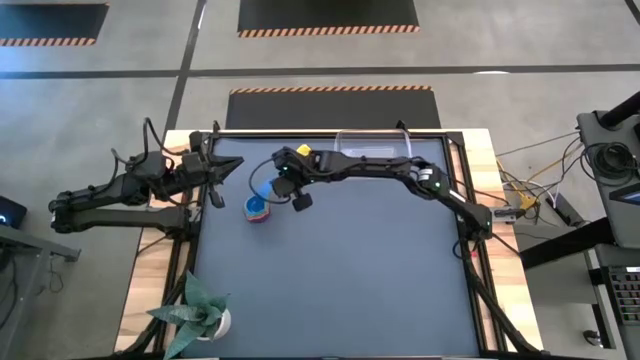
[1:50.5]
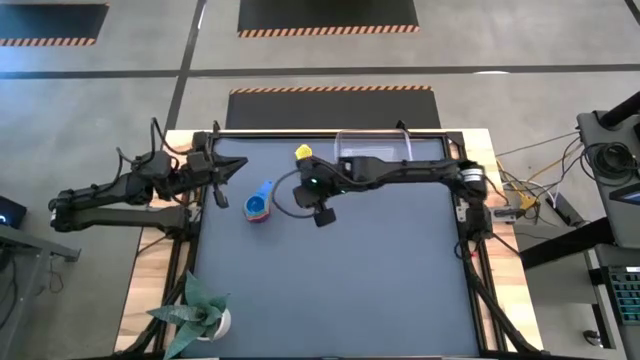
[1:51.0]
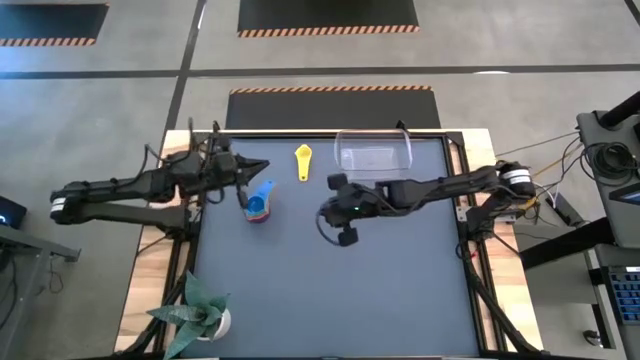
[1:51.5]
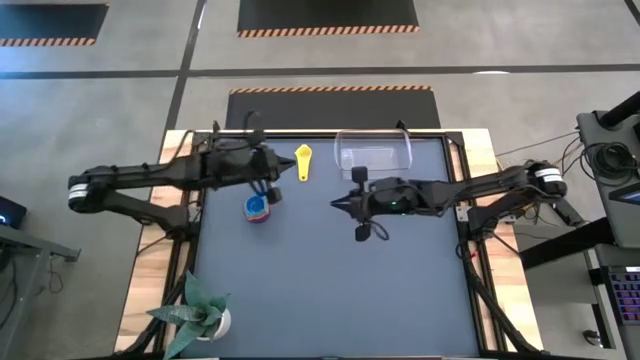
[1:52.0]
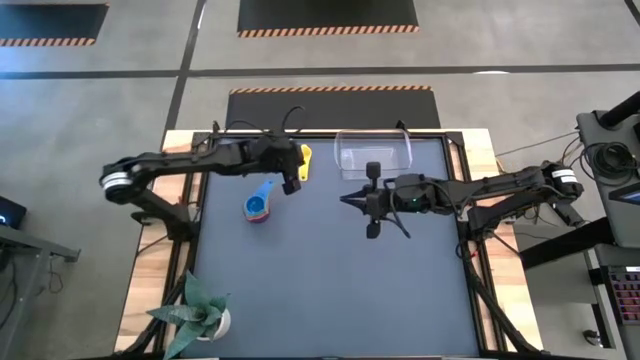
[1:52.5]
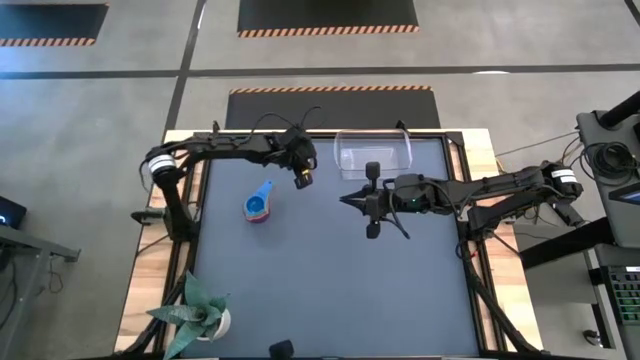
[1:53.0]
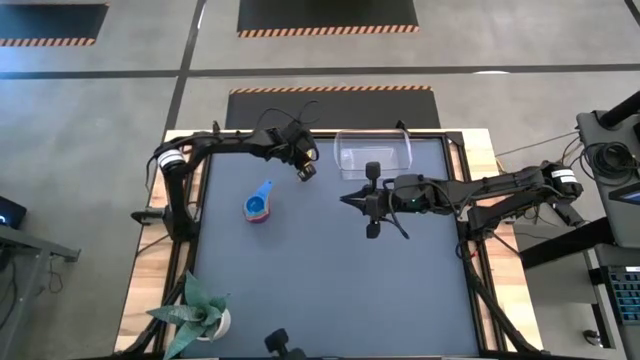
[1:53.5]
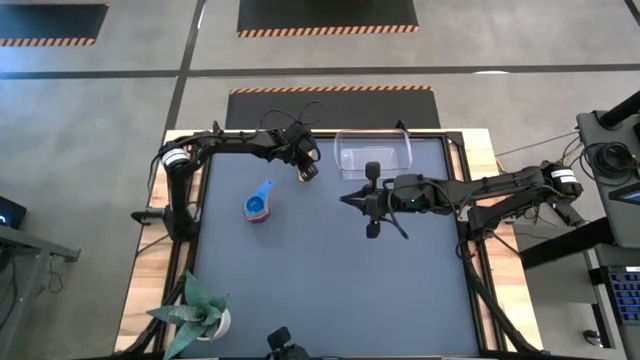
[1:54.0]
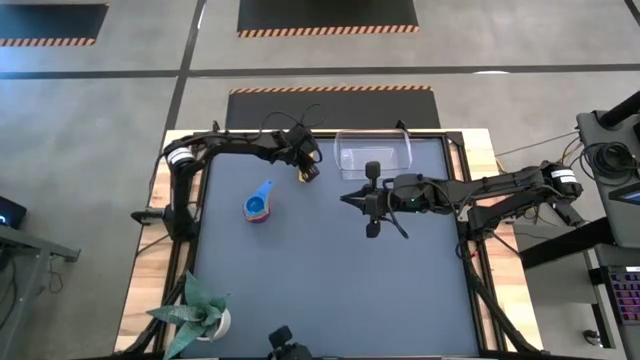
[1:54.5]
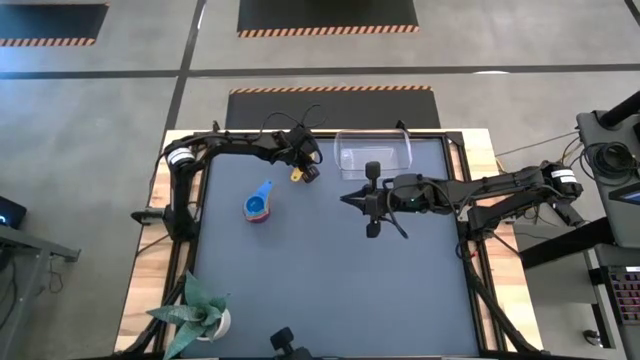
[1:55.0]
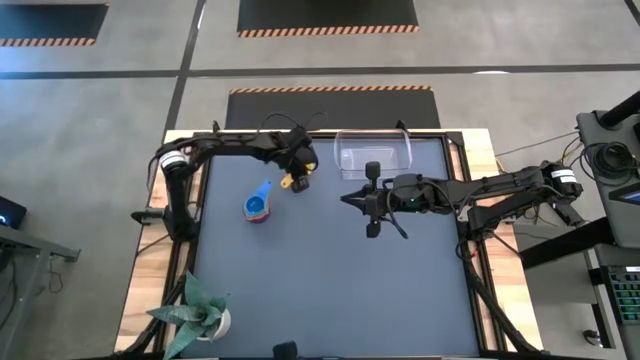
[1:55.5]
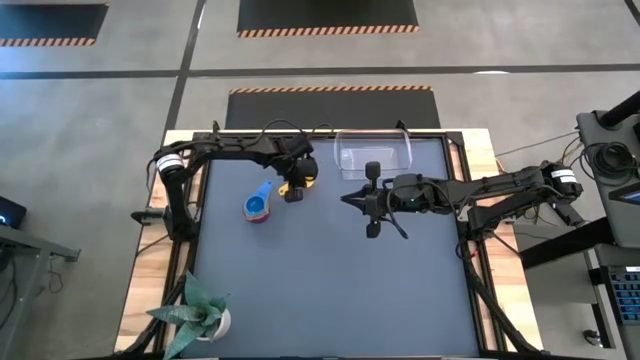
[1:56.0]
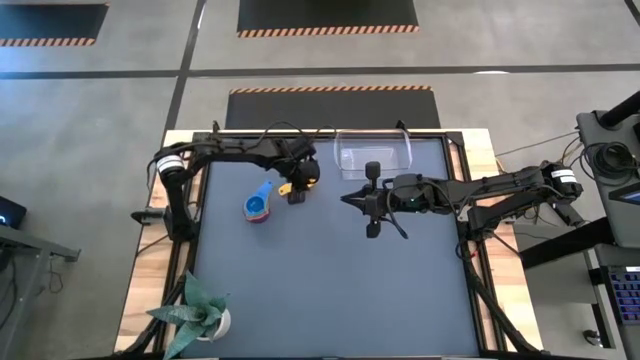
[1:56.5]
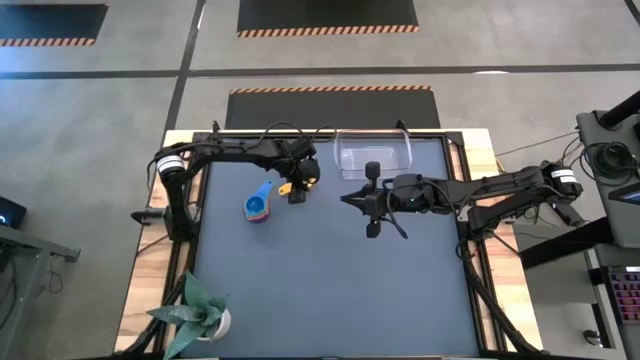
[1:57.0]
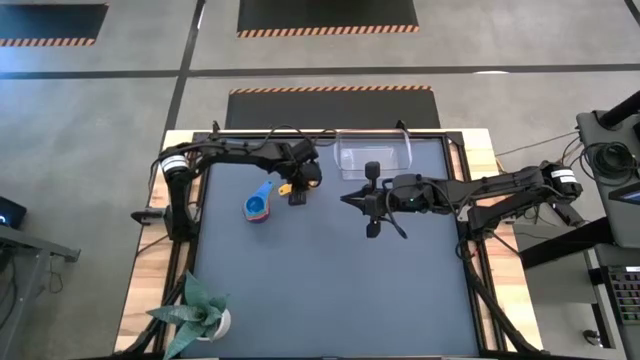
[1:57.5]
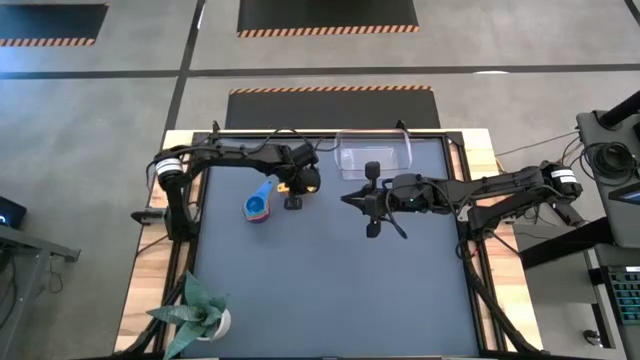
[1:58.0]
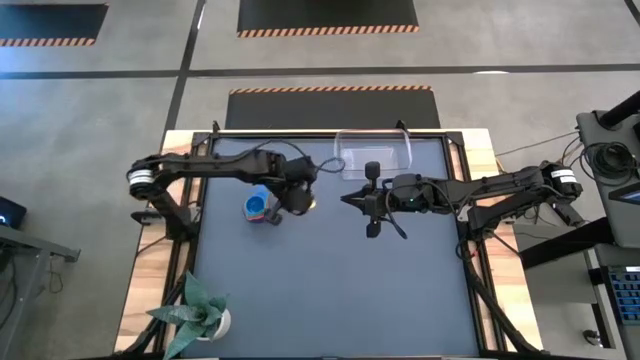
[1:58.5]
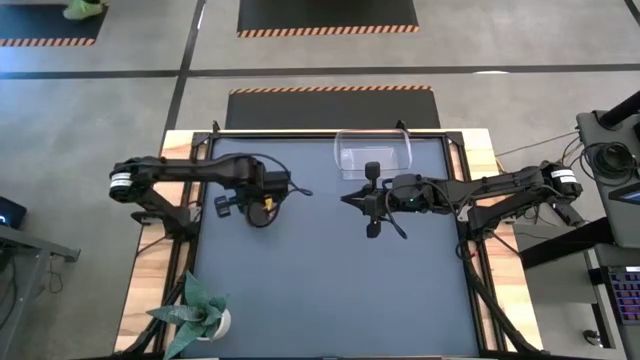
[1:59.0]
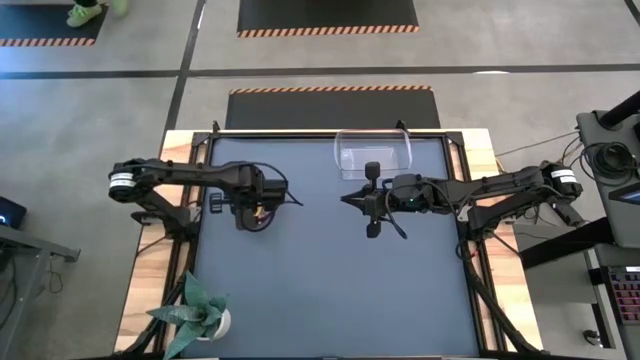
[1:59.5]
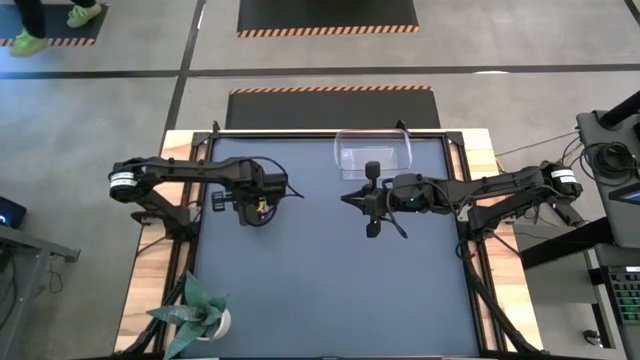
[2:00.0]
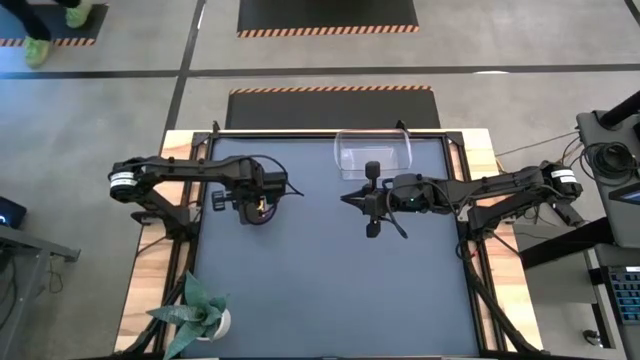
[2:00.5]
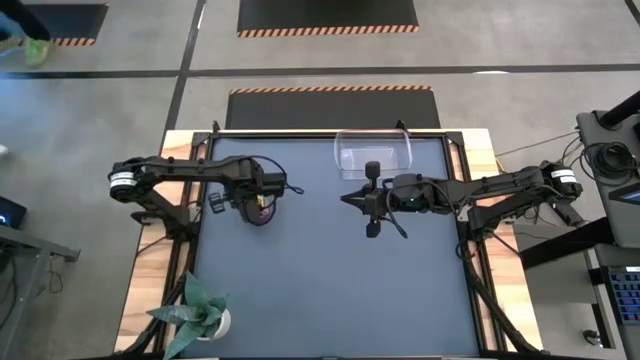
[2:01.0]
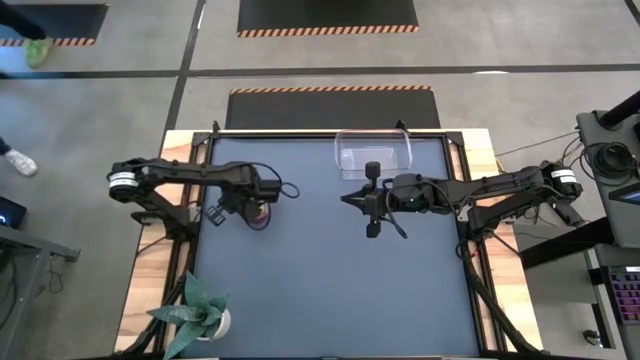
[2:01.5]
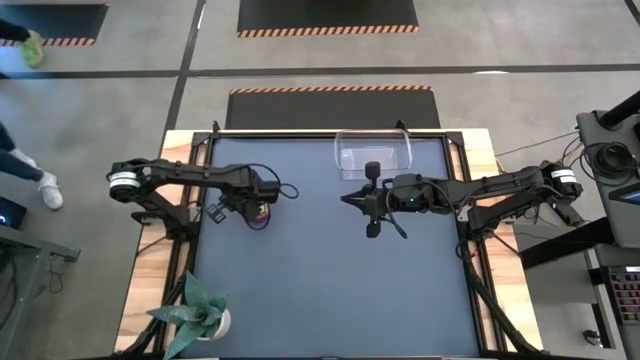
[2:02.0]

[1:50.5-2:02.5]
Task: Nest measuring cups in basket
Stack the yellow measuring cup on top of the blue measuring cup

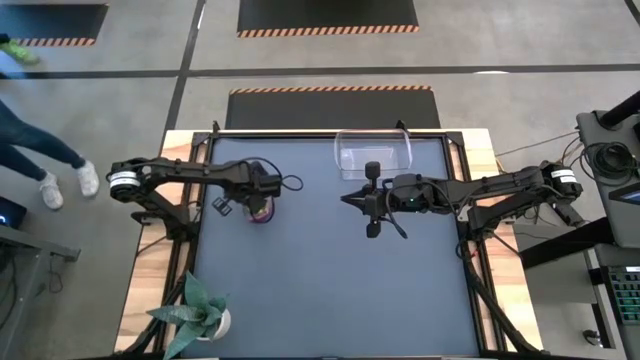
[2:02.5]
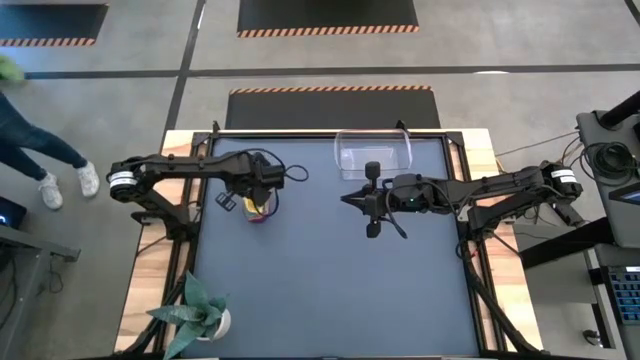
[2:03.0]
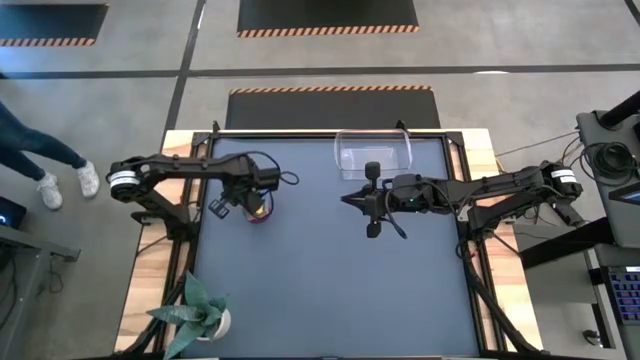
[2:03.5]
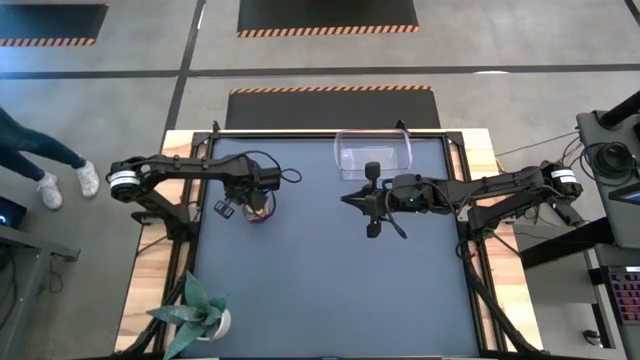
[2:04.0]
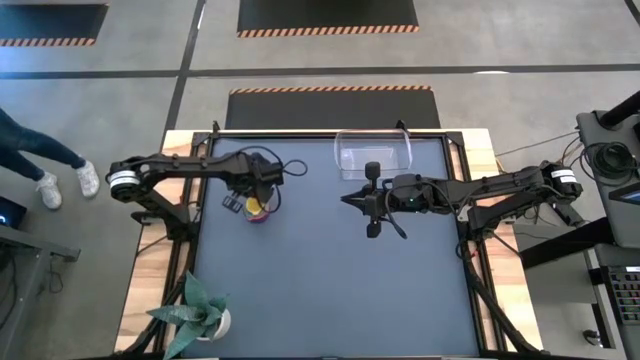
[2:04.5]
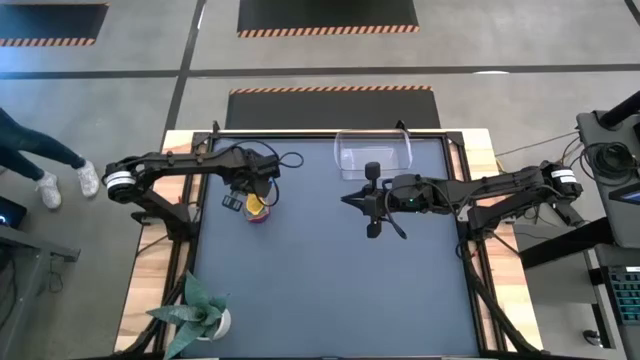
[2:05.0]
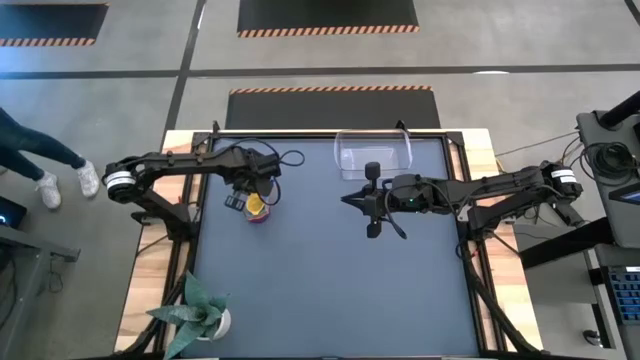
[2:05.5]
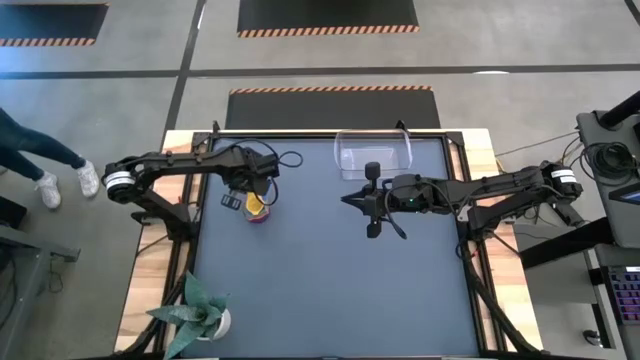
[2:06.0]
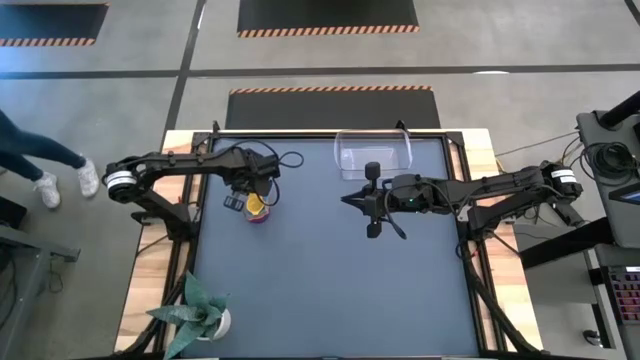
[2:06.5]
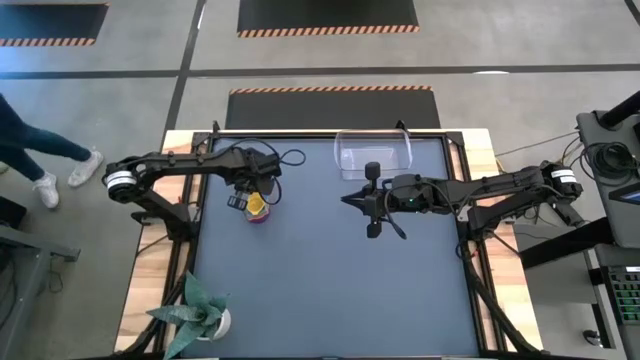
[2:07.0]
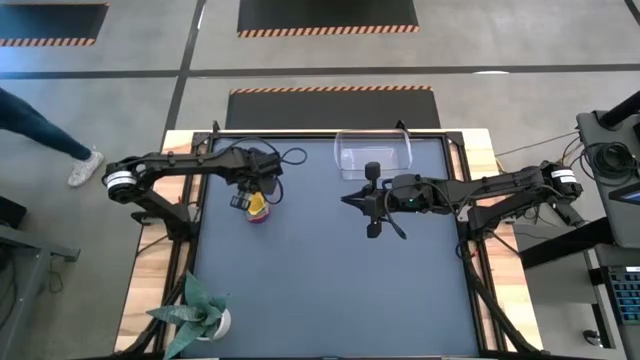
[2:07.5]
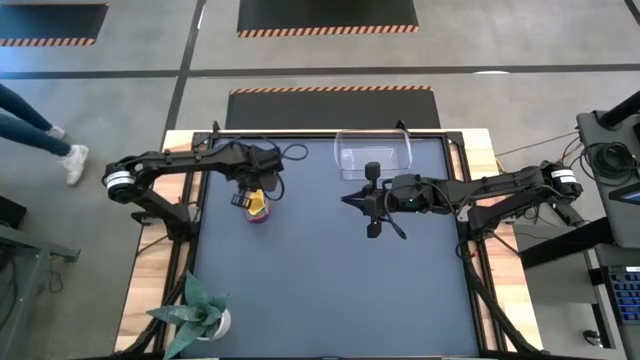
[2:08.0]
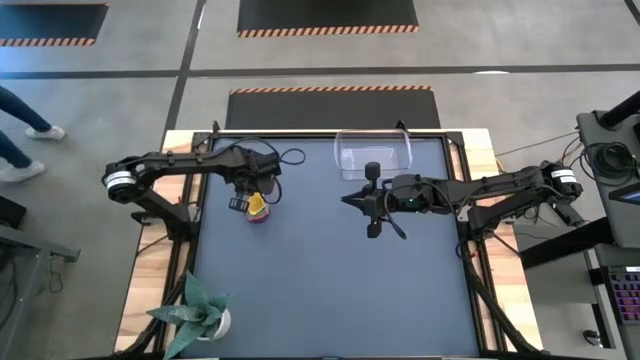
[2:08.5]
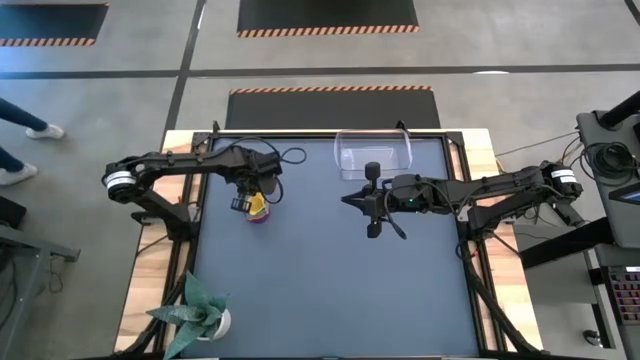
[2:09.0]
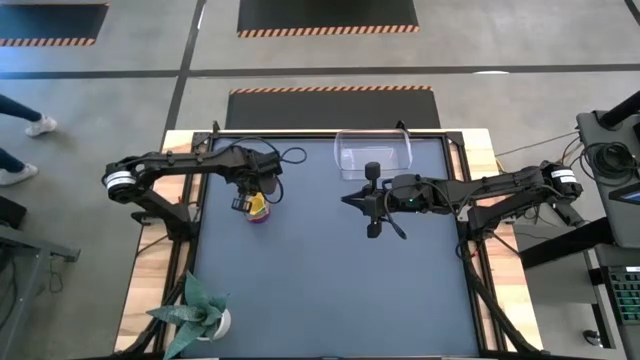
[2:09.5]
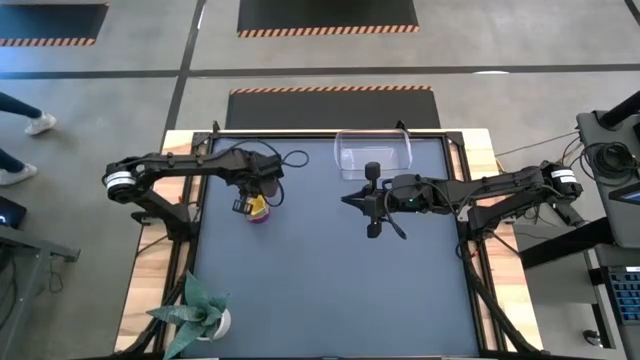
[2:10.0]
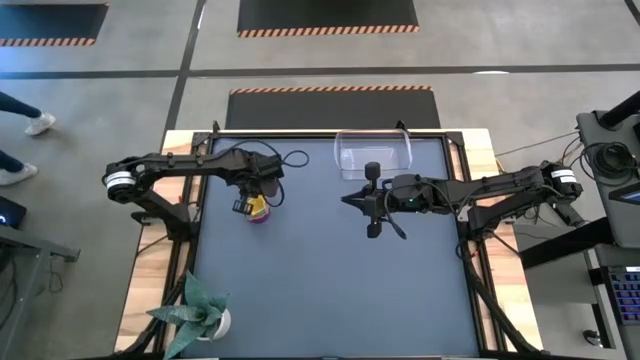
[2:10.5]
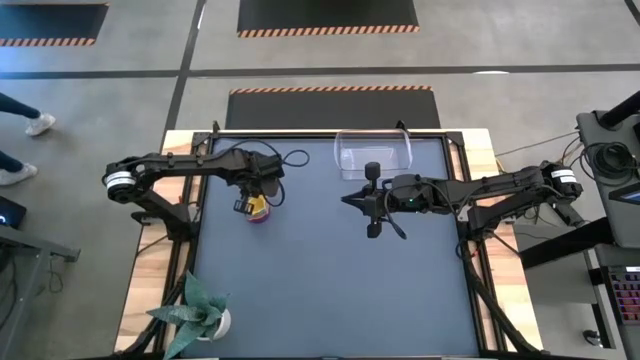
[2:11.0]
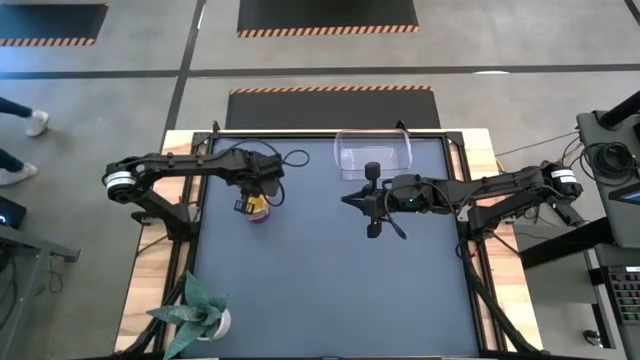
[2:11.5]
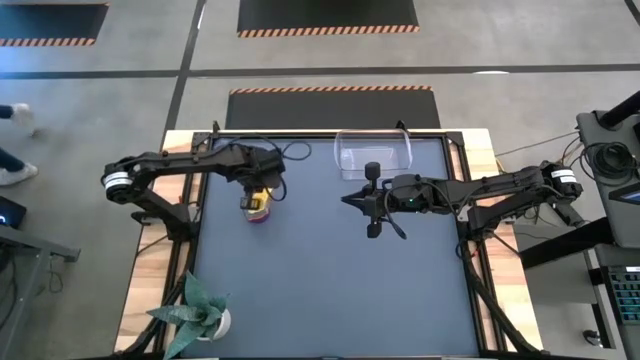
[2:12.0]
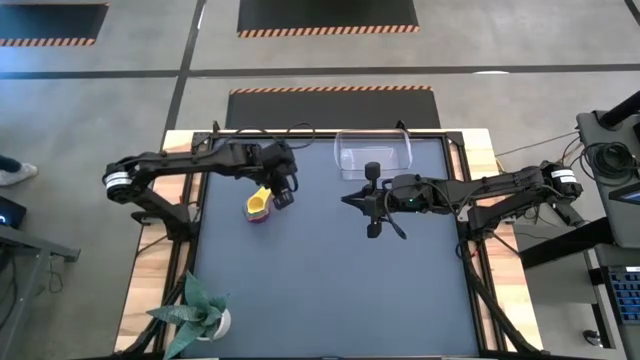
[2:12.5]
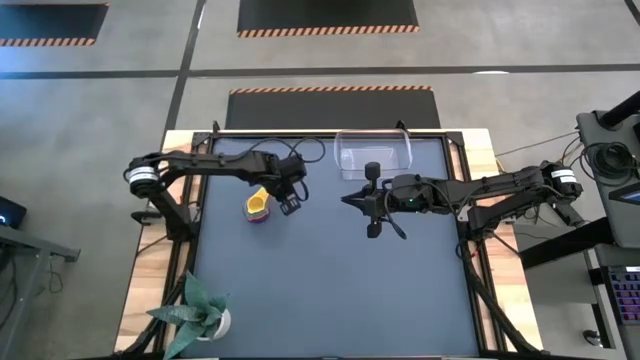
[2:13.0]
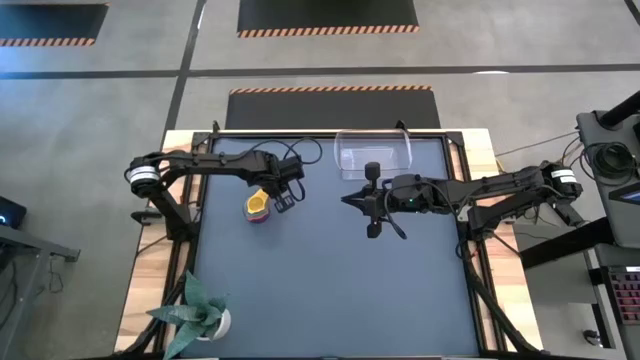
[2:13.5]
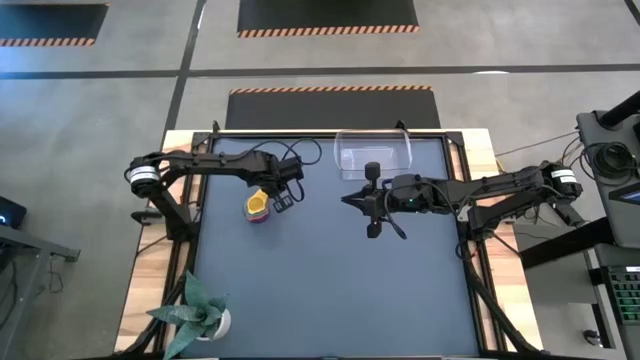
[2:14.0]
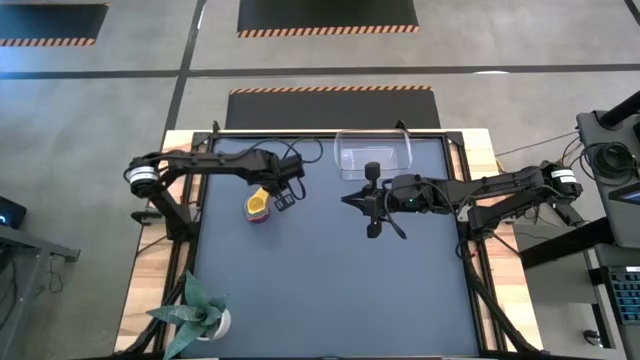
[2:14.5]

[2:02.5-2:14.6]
Stack the yellow measuring cup on top of the blue measuring cup
